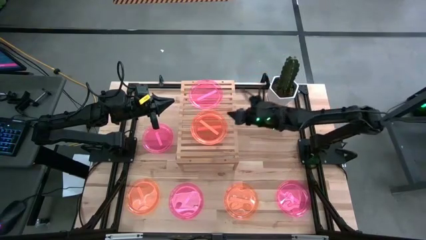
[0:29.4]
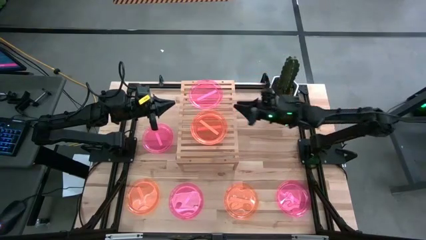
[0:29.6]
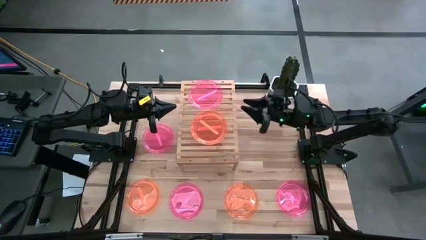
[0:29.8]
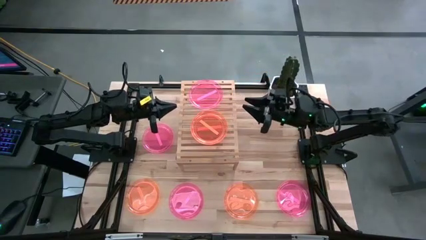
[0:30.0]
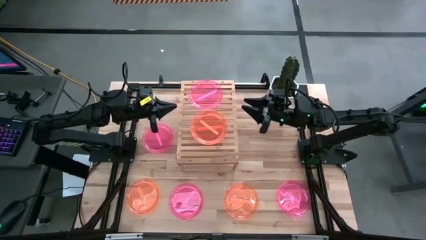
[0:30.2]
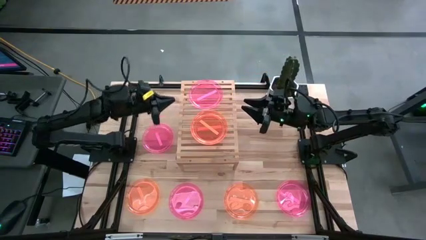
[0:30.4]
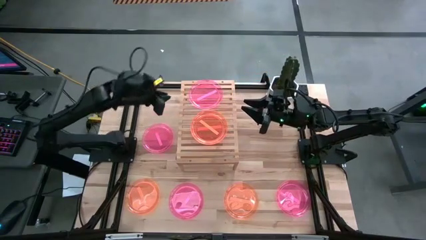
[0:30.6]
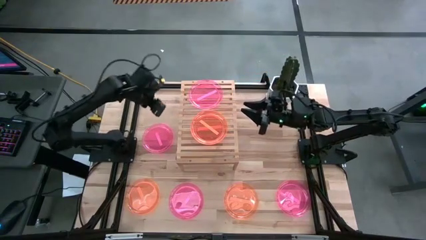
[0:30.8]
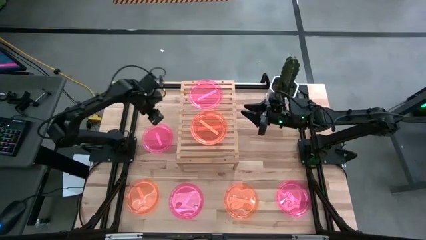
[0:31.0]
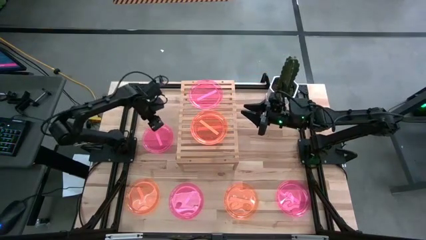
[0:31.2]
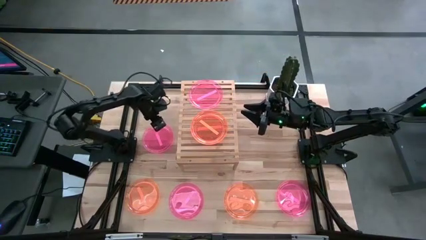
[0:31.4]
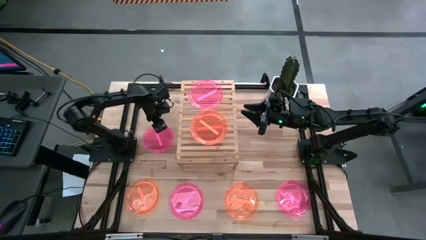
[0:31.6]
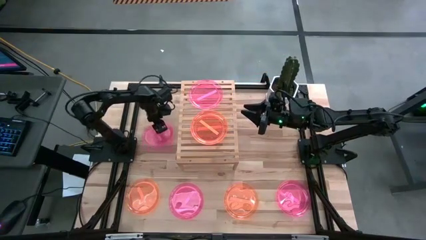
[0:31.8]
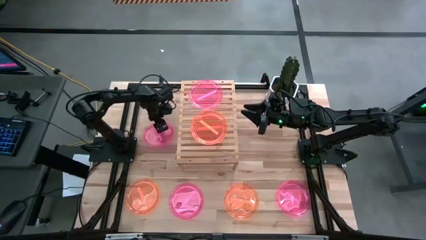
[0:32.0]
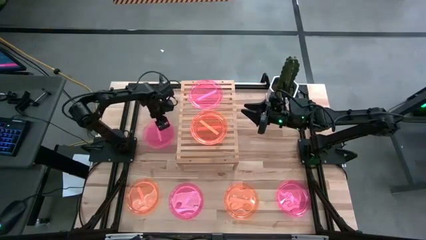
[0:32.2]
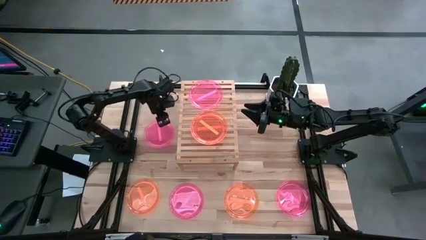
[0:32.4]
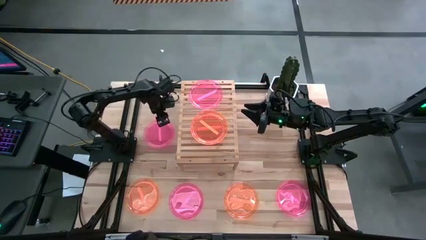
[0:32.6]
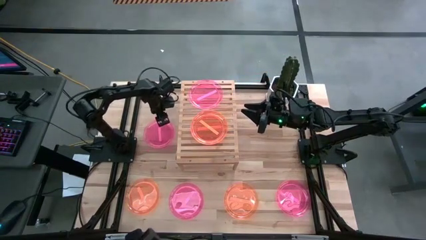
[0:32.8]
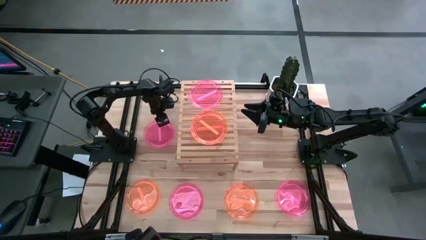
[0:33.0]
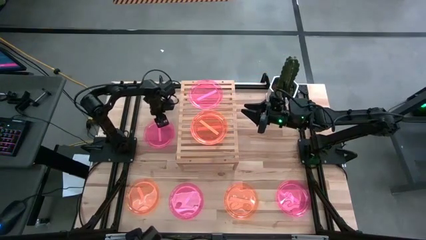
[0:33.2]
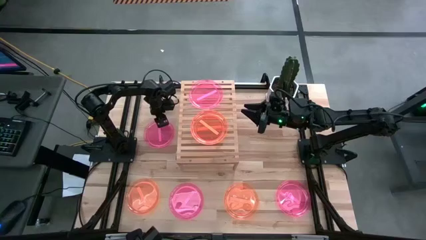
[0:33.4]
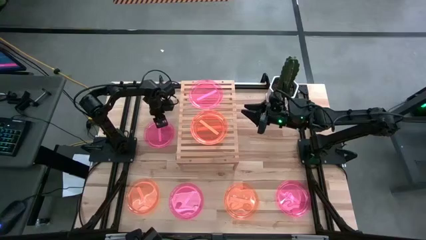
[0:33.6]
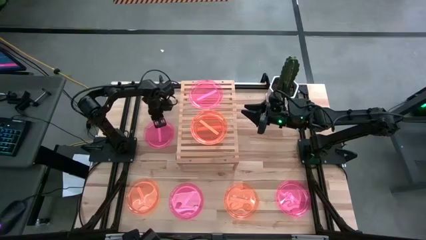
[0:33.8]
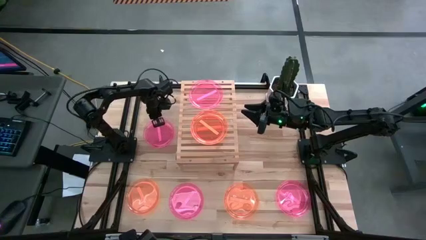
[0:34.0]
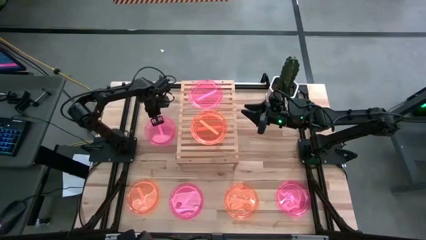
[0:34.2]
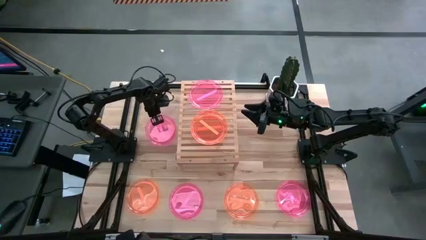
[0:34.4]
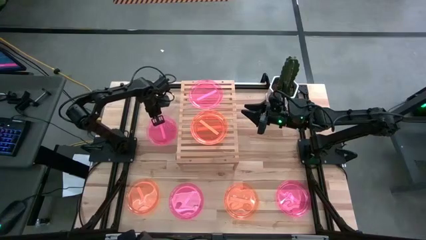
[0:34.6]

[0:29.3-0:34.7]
Task: Place and stack plates onto a shelf
Stack the top pink plate on top of the other pink plate on the shelf

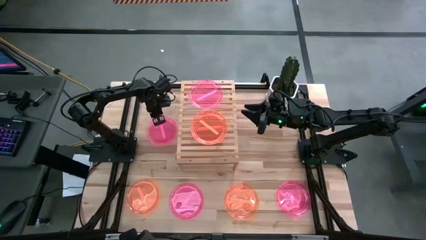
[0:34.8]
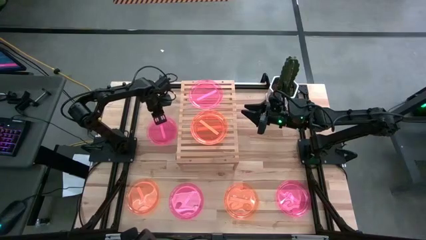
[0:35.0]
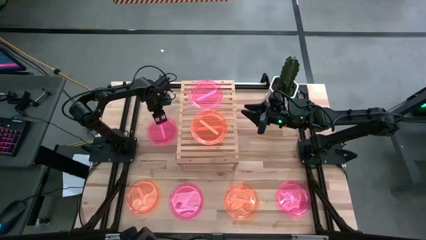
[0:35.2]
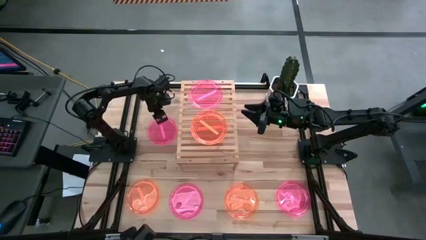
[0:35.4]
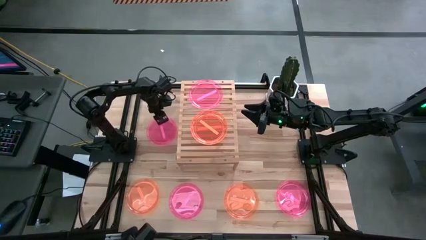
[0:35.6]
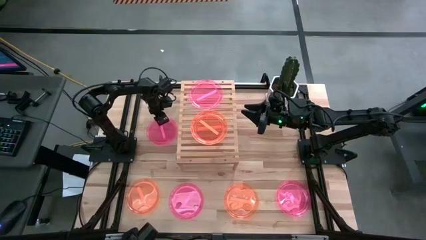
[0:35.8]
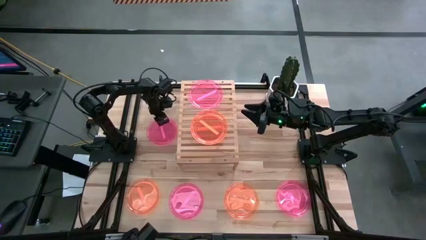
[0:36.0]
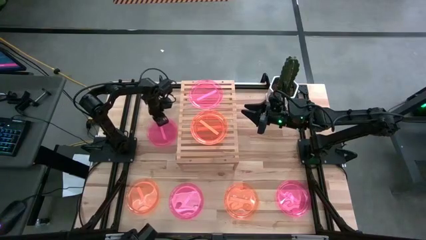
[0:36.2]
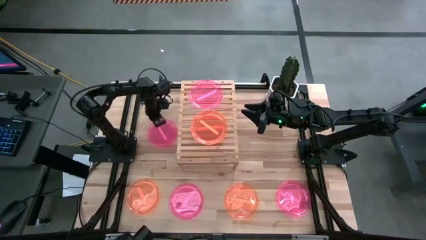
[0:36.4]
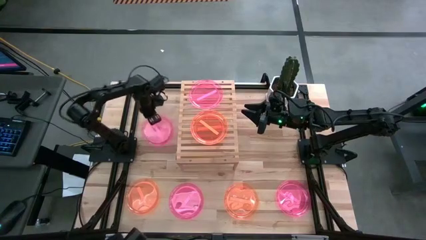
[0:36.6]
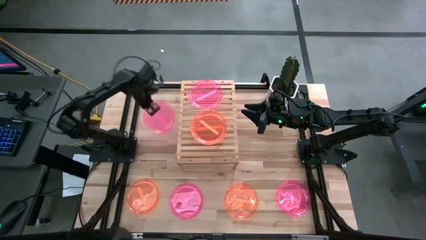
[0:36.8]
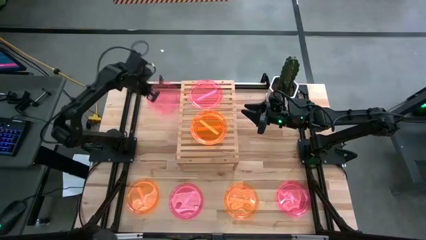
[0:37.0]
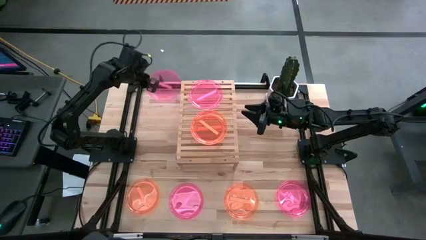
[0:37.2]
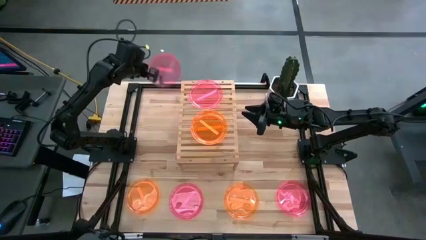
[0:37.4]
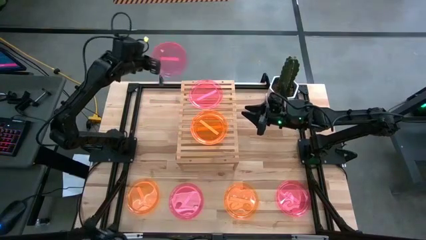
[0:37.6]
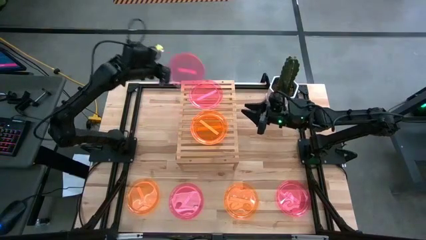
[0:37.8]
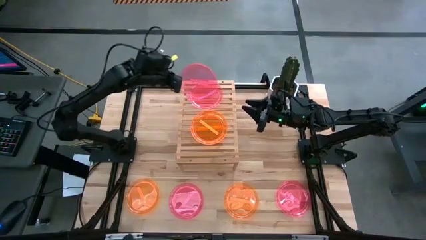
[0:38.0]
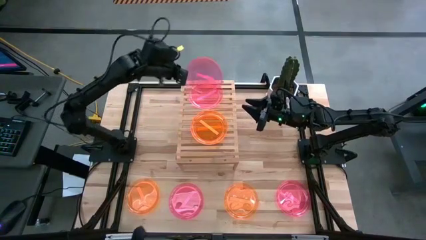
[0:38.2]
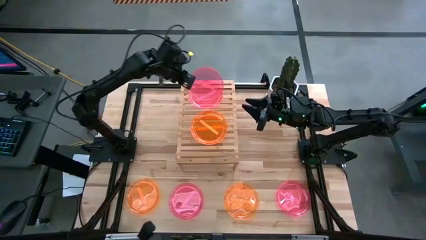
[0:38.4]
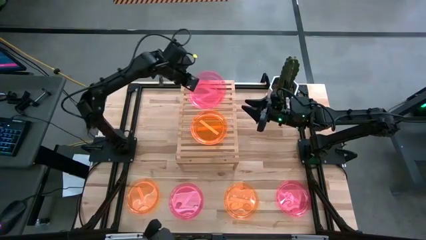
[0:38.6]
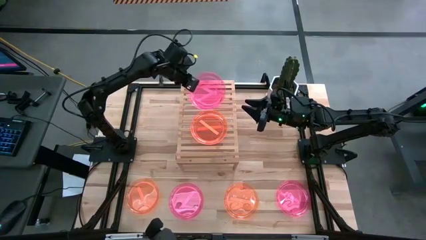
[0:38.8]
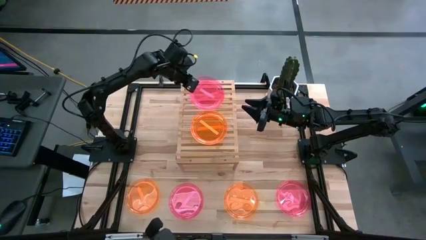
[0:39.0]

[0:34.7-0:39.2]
Stack the top pink plate on top of the other pink plate on the shelf

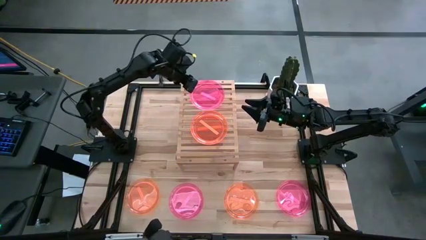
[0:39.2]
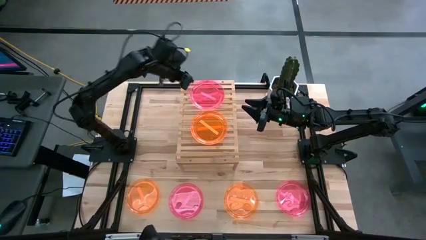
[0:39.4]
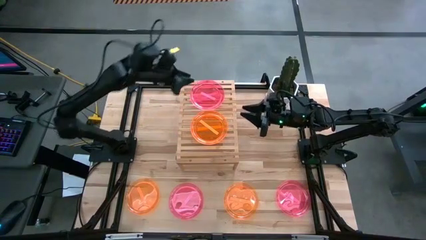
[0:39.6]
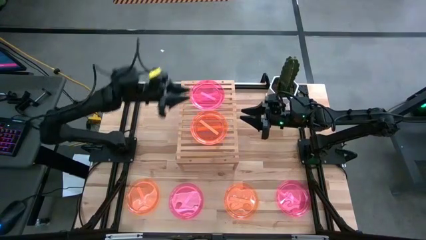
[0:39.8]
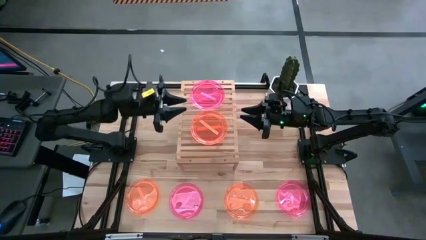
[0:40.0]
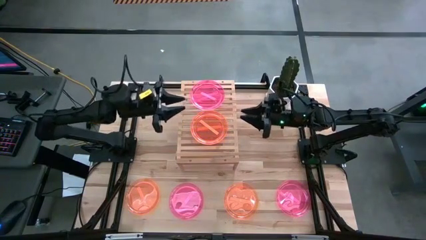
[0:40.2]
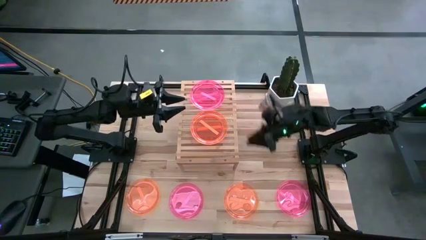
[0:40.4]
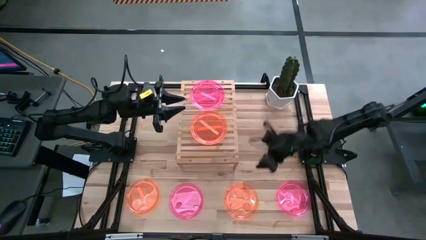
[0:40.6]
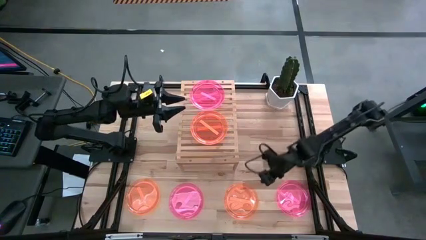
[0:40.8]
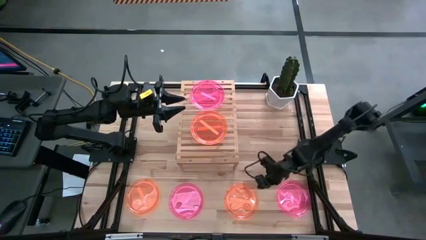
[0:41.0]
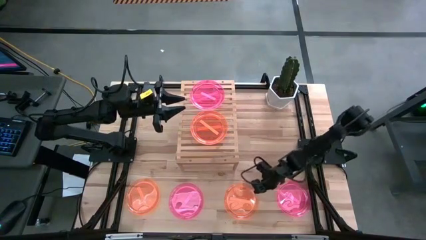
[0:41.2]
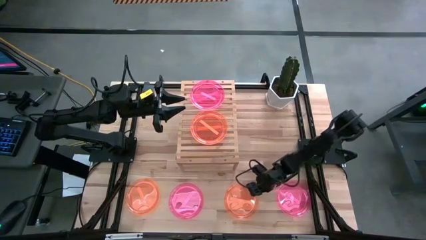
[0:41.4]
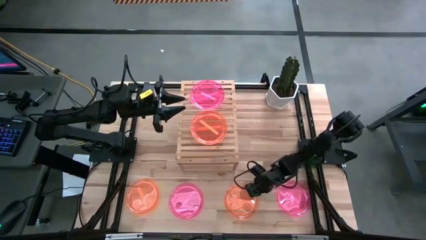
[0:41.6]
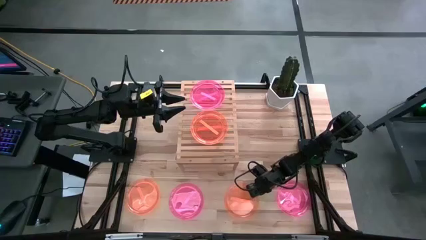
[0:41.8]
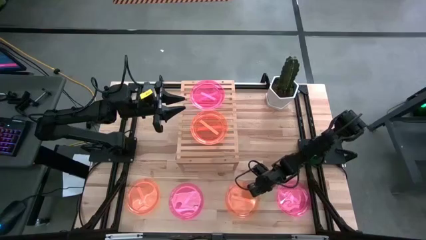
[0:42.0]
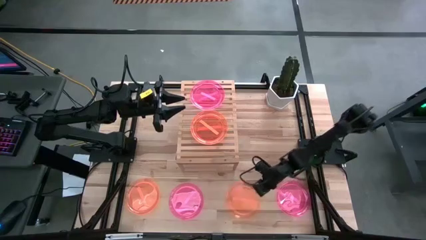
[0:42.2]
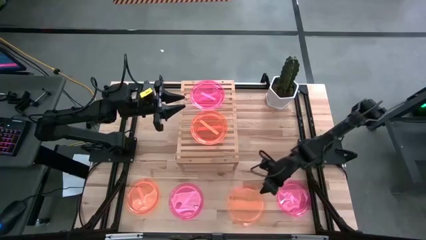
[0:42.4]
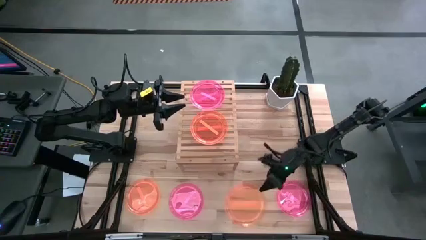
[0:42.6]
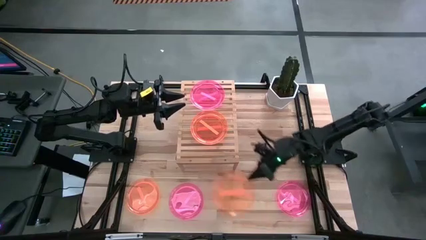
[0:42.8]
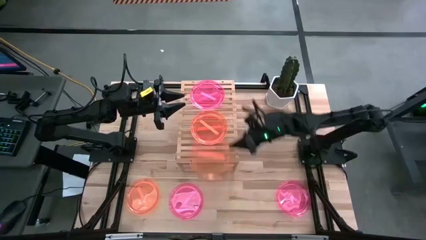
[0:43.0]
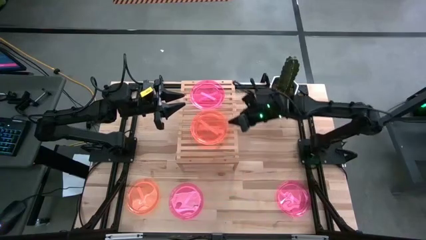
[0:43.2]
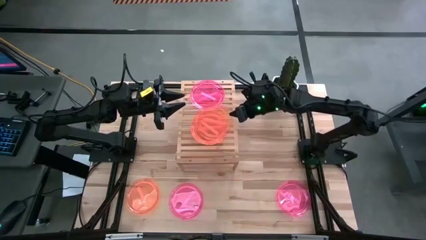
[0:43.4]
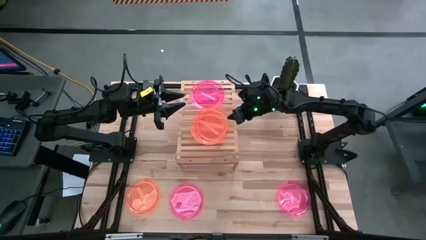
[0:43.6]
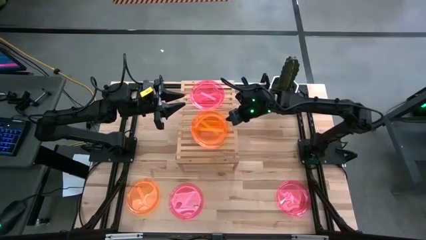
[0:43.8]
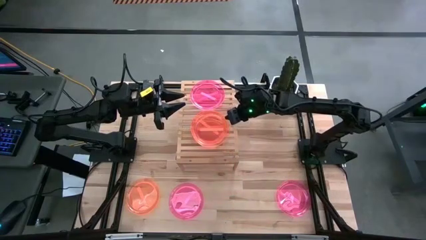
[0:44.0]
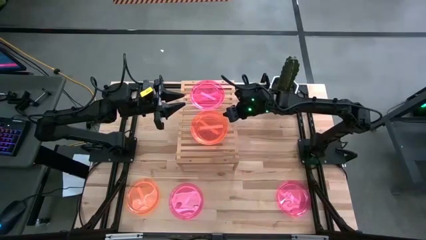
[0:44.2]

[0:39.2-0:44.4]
Stack the orange plate on top of the other orange plate on the shelf

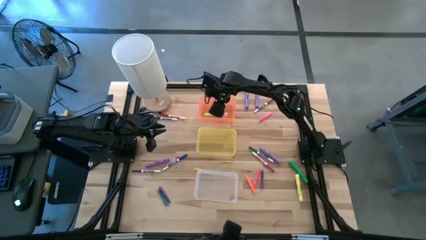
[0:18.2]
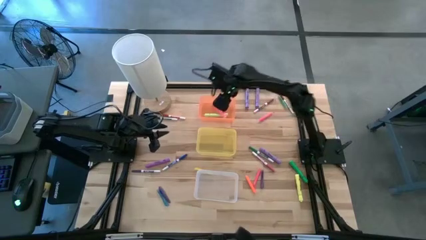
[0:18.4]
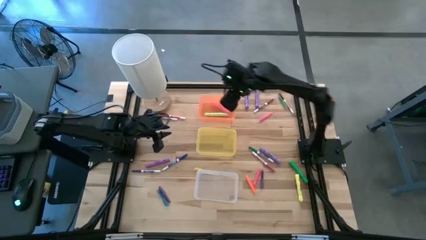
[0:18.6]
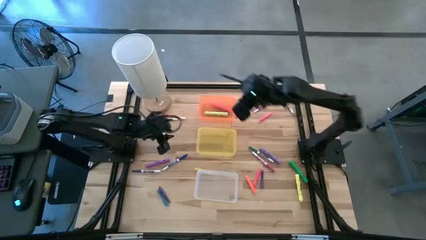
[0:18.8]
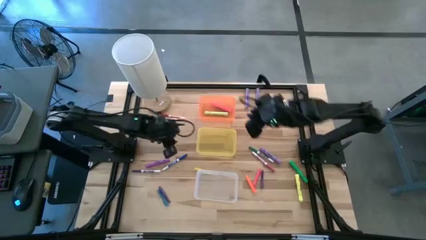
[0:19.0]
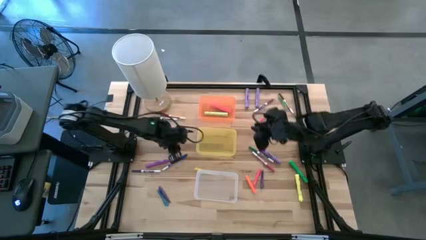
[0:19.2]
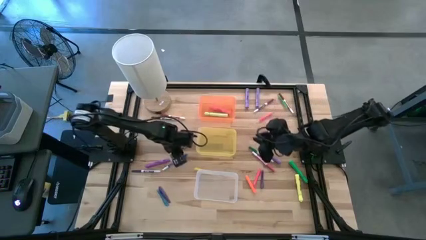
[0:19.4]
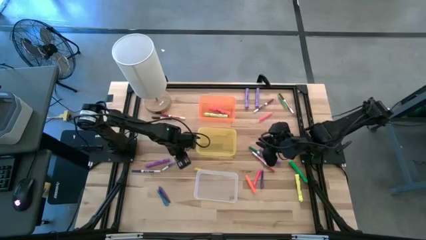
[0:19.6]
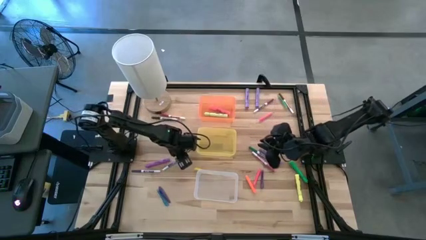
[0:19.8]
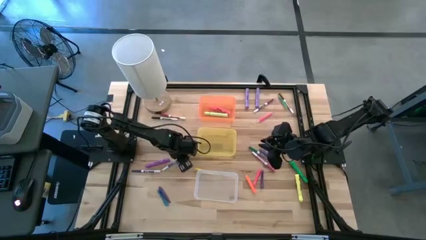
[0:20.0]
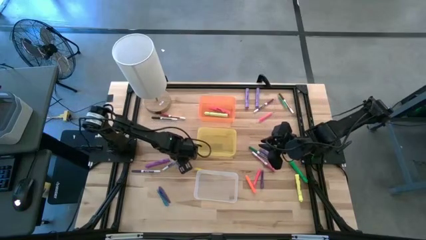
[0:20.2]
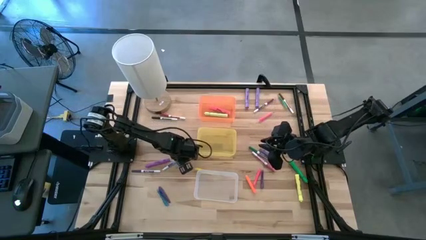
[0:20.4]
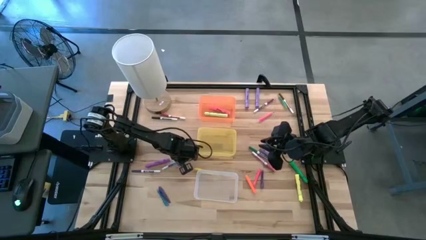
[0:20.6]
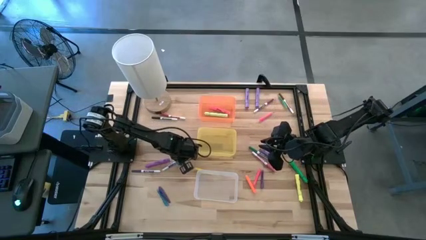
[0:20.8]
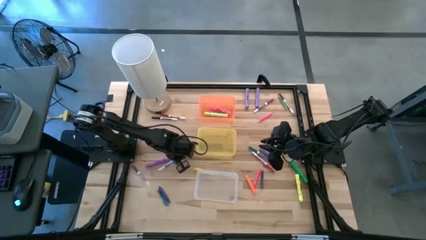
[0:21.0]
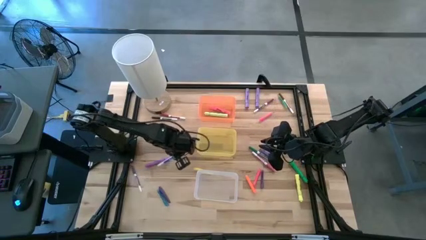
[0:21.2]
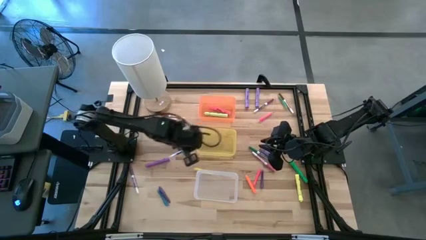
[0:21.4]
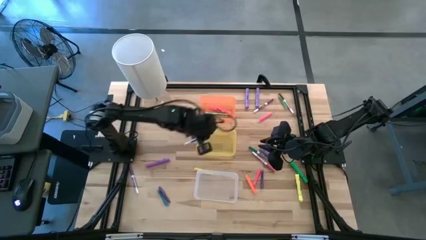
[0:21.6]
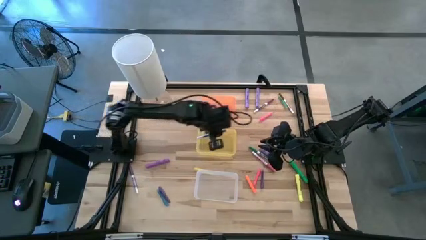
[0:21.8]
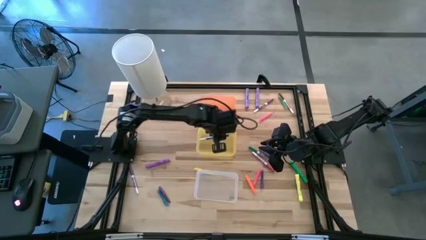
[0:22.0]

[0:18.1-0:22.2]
Task: Pick & Place Markers
Put the blue marker pen into the yellow bin
